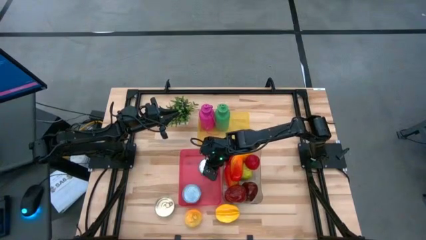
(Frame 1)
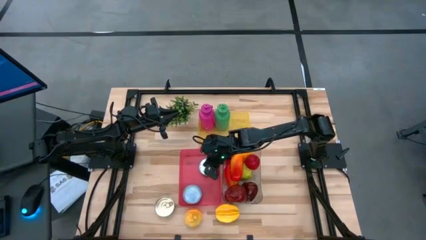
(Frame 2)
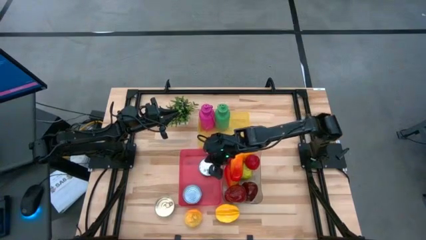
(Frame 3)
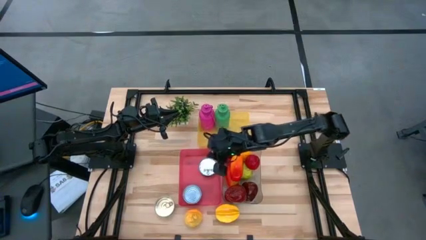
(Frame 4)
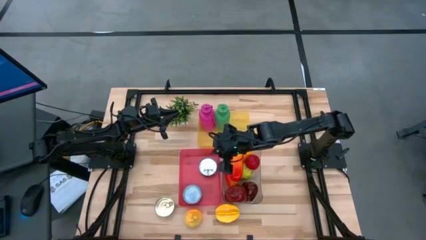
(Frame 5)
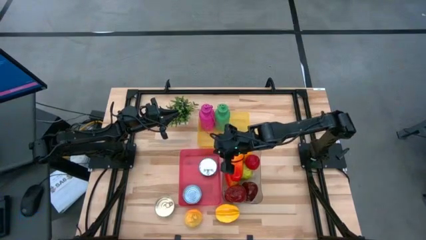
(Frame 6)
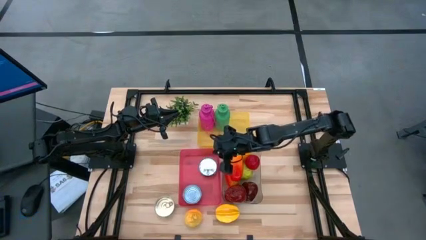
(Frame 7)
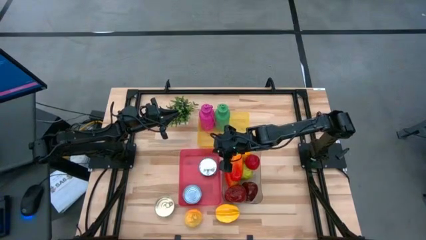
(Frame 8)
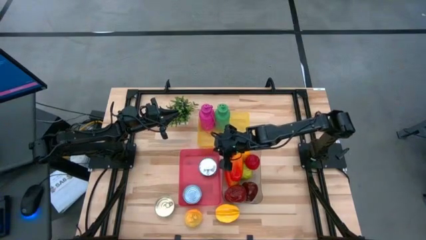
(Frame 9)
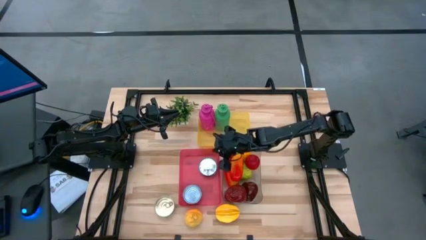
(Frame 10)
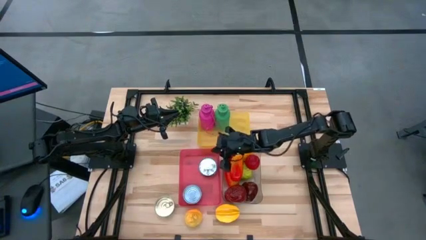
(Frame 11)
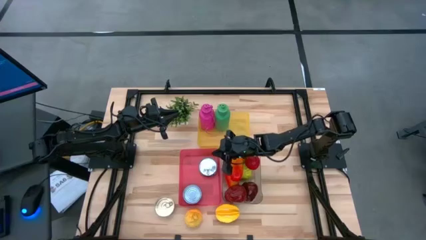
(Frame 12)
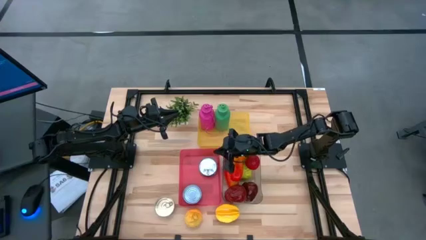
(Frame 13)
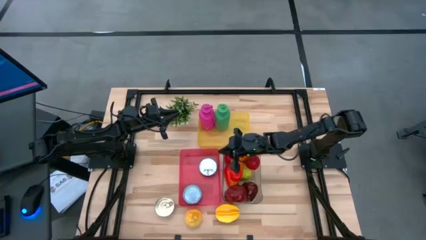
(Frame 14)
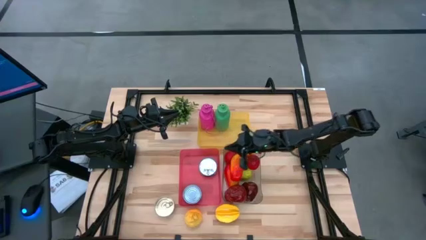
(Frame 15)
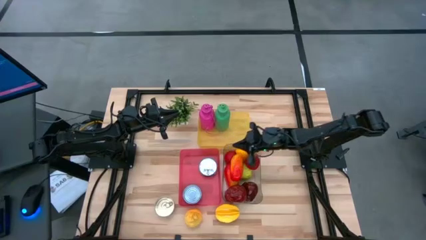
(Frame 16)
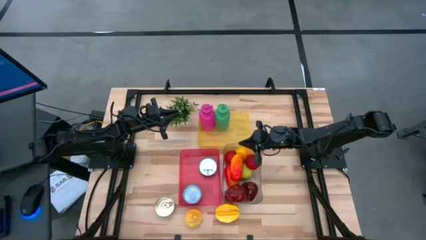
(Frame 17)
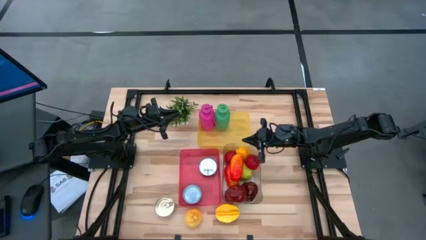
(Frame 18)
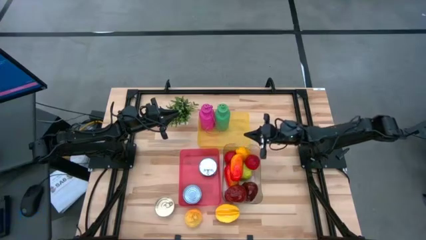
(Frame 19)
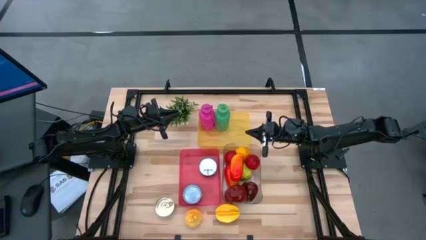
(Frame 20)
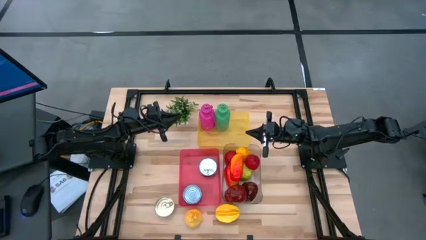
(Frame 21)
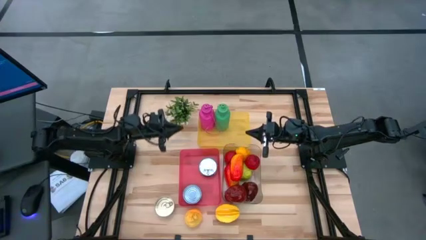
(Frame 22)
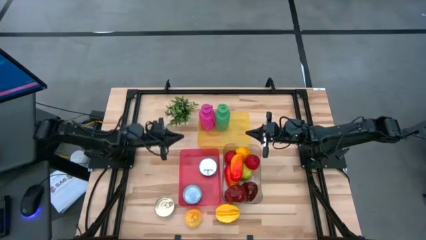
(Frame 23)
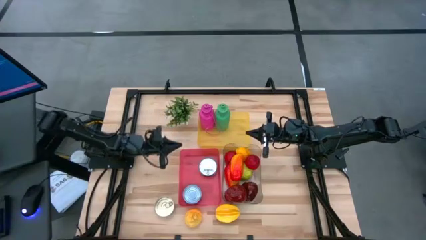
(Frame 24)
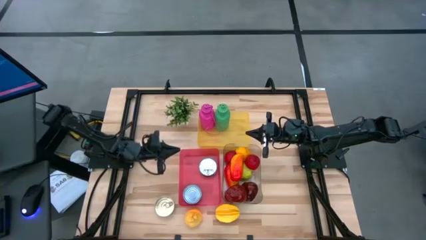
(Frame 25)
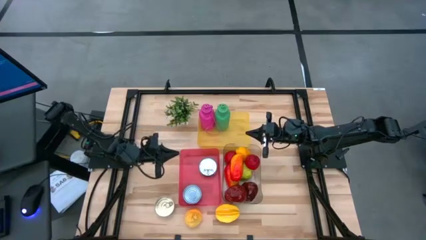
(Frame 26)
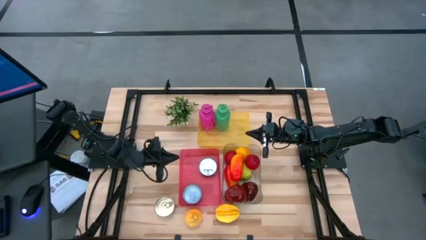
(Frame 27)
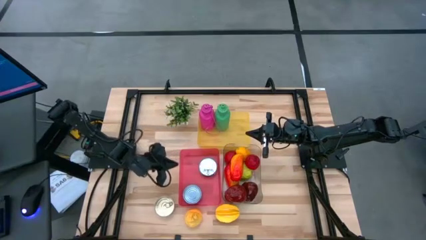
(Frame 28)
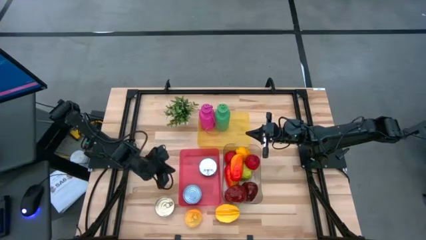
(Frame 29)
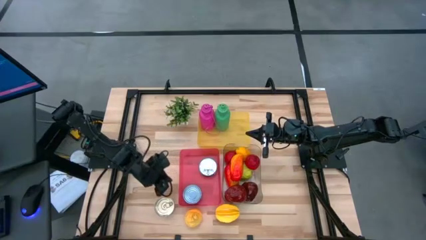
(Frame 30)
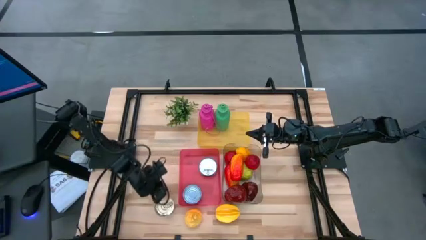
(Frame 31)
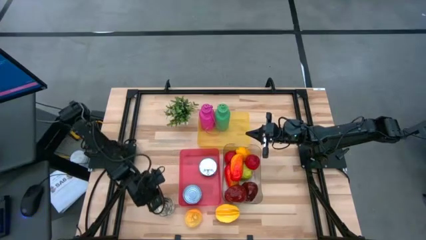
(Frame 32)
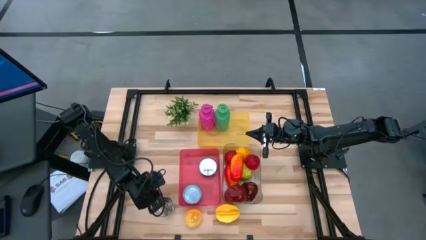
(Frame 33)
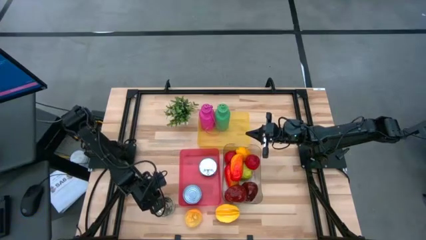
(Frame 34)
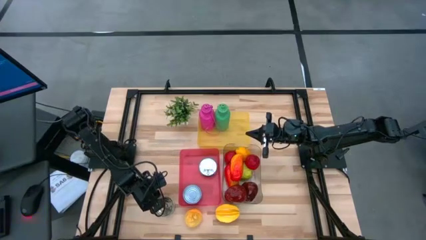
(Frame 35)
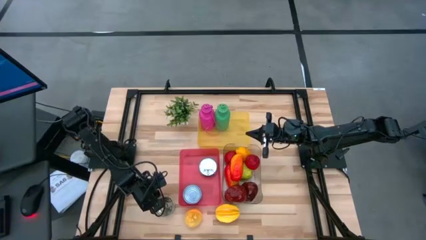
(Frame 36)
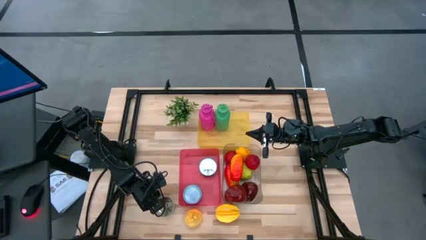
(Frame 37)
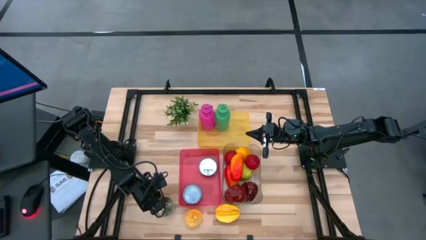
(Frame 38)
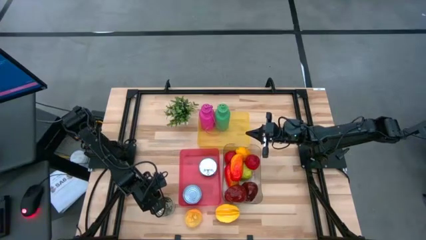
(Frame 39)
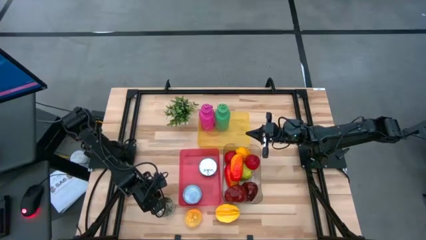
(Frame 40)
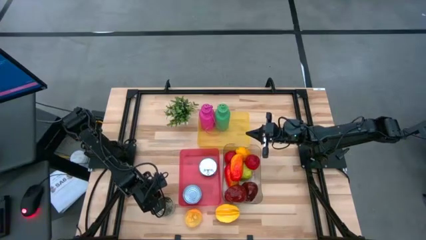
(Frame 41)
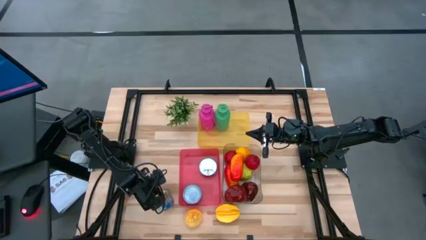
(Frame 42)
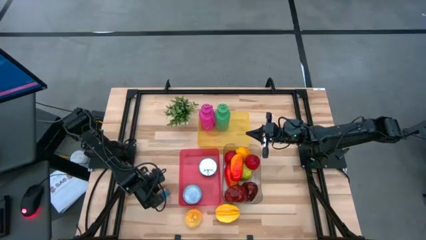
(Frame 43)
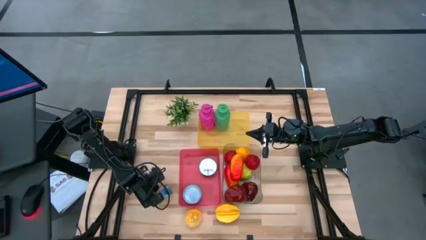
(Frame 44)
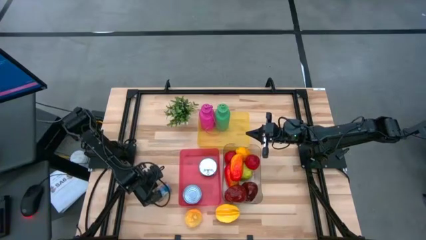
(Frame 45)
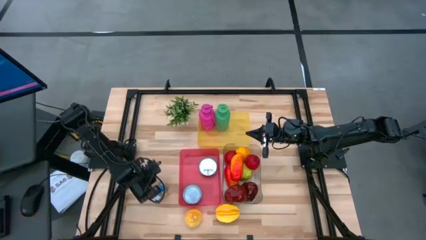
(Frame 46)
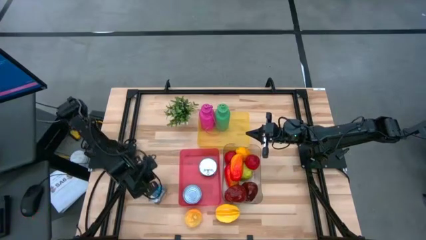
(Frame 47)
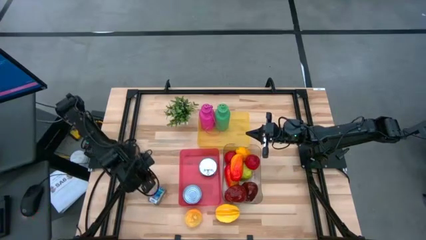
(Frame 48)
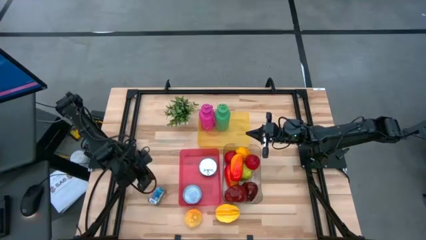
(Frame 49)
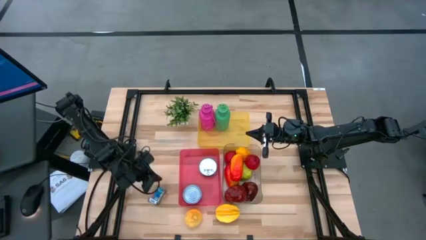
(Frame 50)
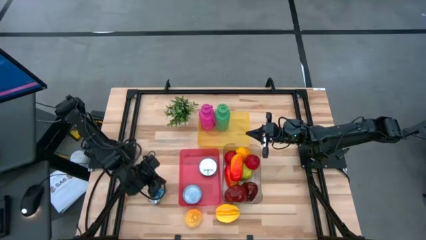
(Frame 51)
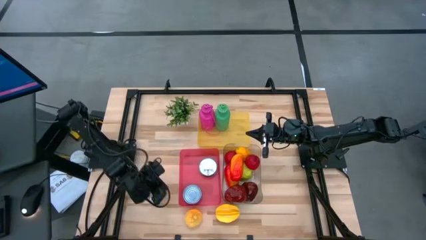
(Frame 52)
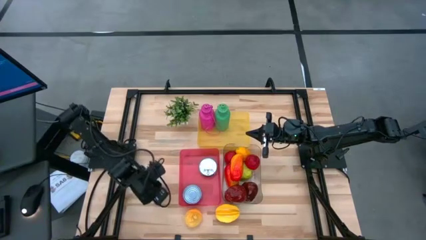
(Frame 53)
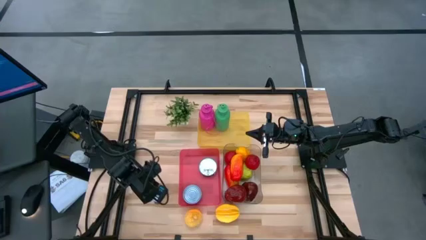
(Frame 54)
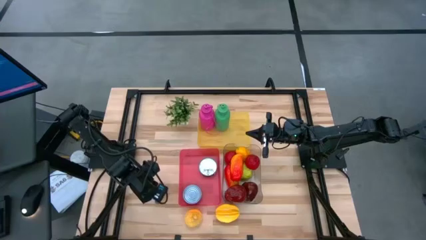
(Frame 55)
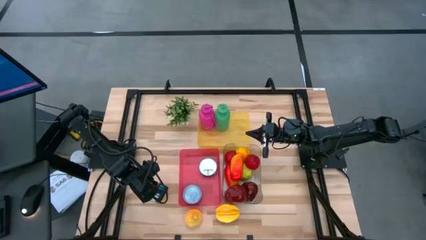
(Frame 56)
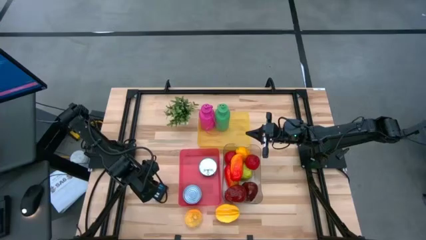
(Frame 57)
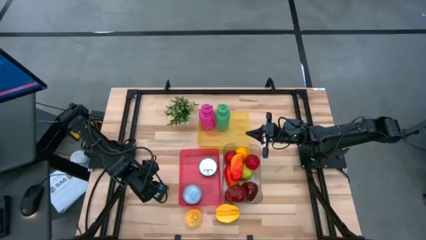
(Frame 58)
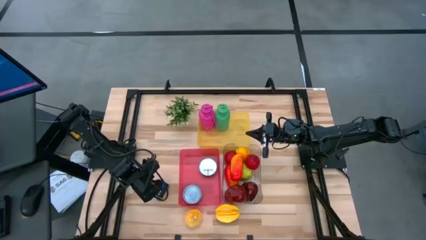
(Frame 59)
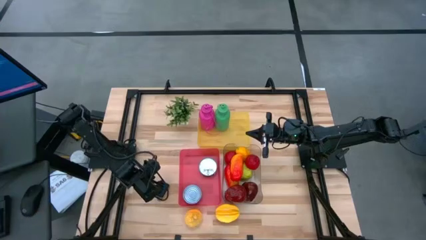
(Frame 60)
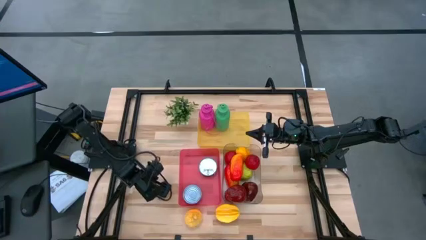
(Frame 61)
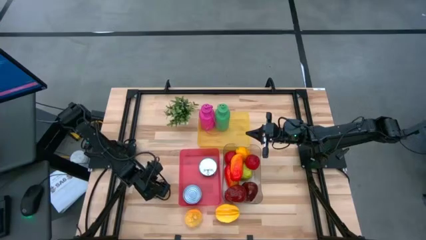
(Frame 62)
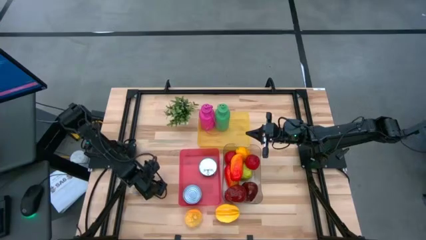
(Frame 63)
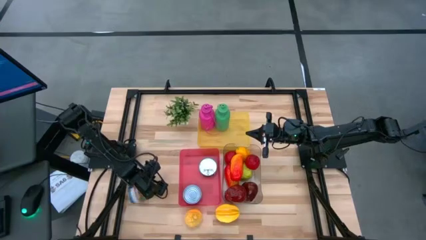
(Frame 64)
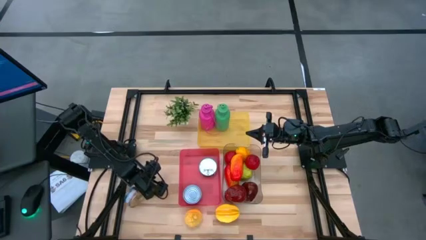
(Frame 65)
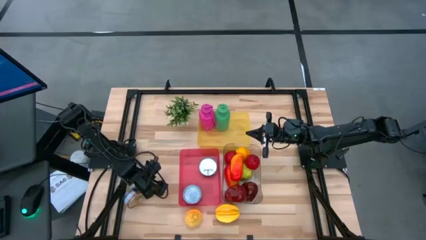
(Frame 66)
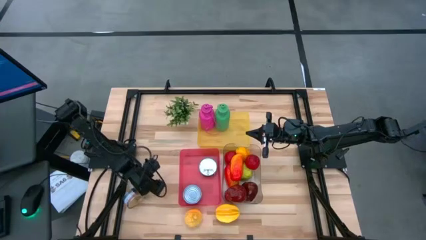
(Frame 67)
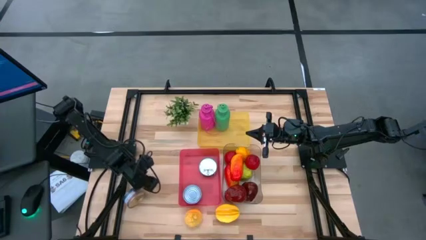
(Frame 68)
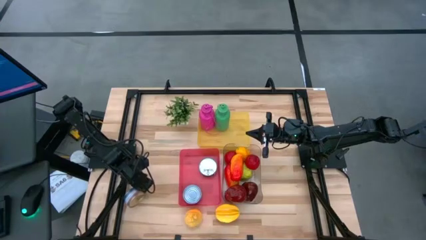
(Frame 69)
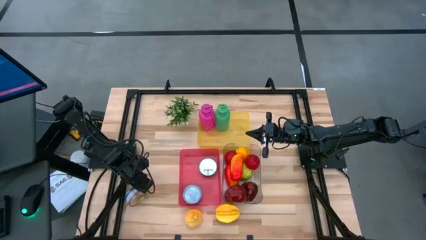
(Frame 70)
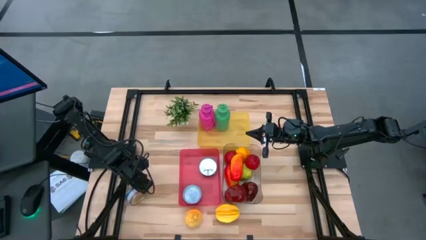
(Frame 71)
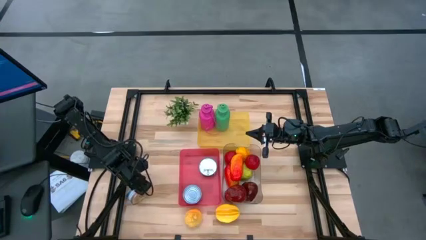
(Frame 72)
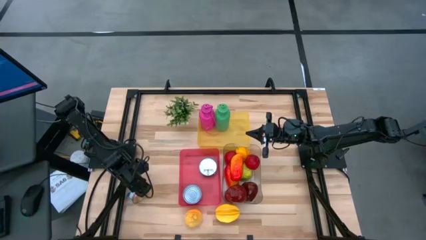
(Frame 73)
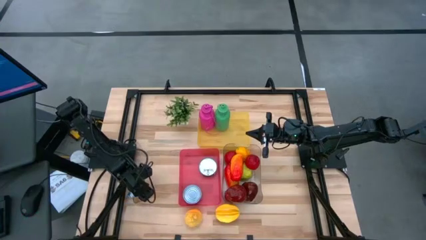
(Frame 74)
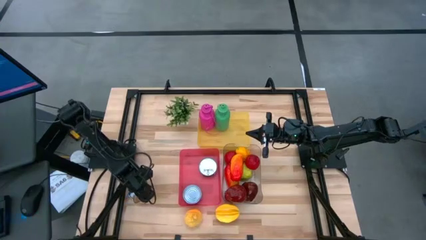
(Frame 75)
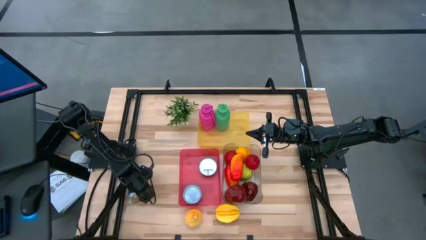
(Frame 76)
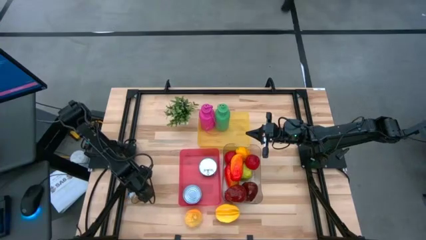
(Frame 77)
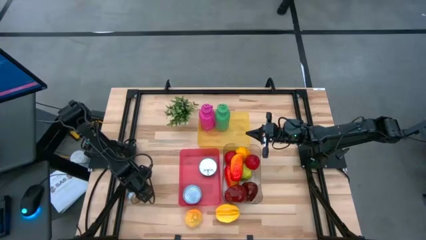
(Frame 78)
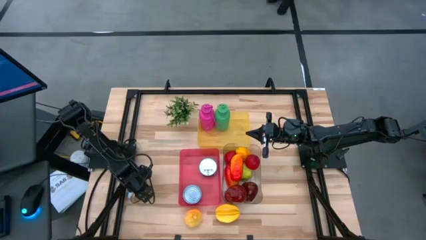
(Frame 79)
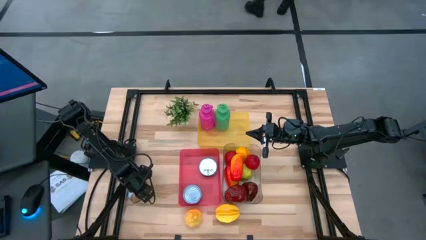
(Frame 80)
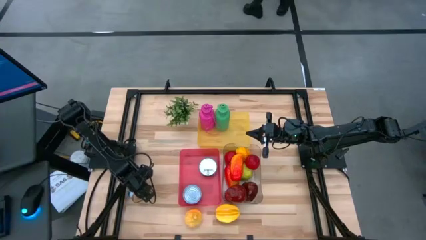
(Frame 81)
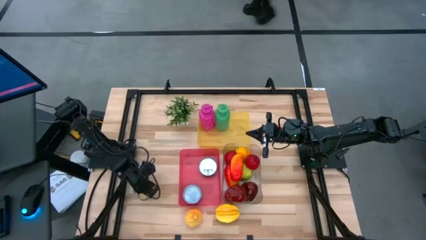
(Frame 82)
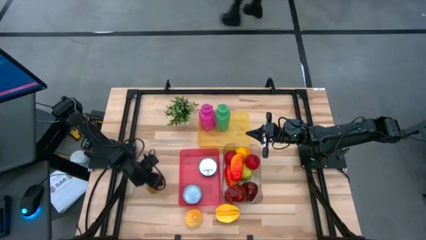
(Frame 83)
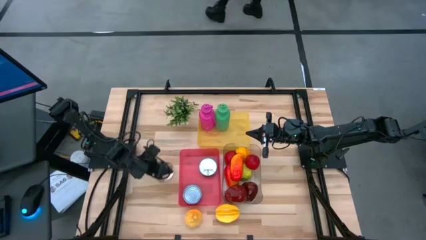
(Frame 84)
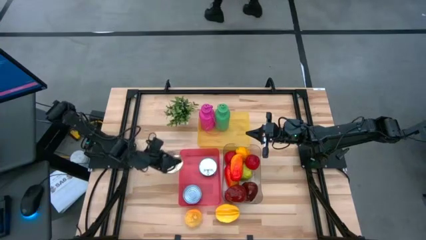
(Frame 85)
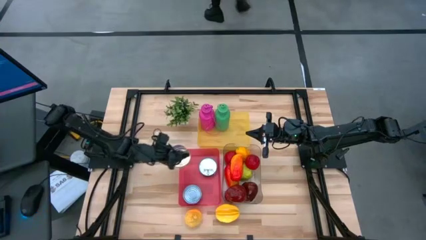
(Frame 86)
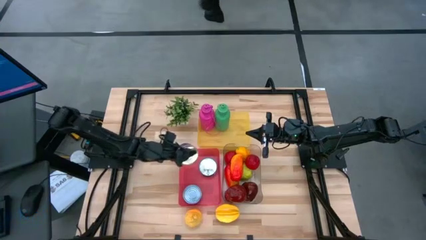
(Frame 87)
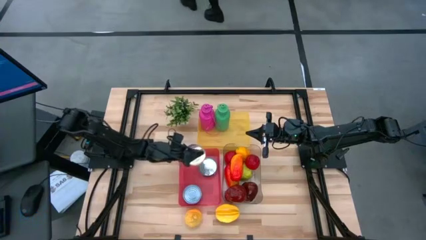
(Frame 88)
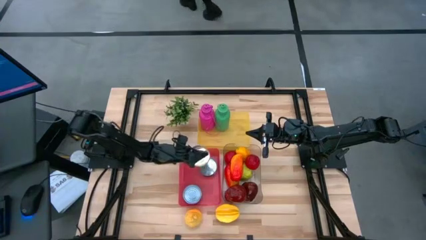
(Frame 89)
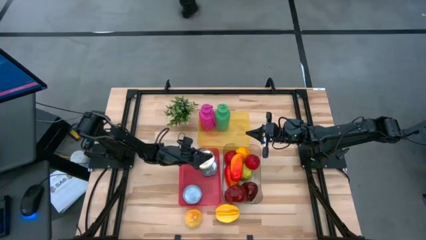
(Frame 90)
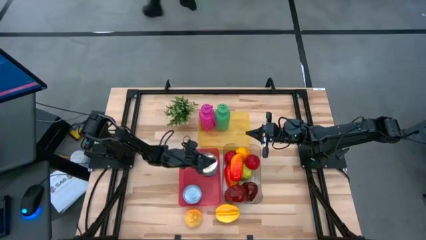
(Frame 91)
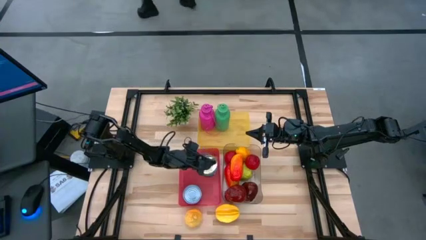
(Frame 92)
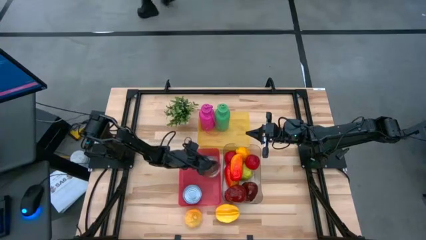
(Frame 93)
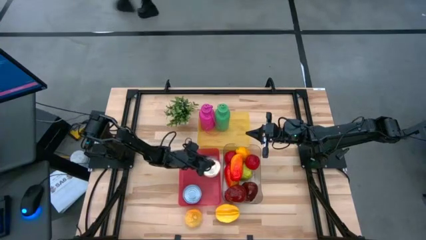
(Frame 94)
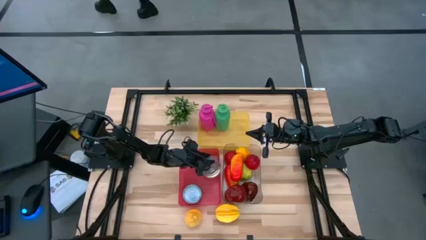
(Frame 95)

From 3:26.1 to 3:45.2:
Task: Pick & Place Food Item
Put the blue and pink tuna can into the red bin
